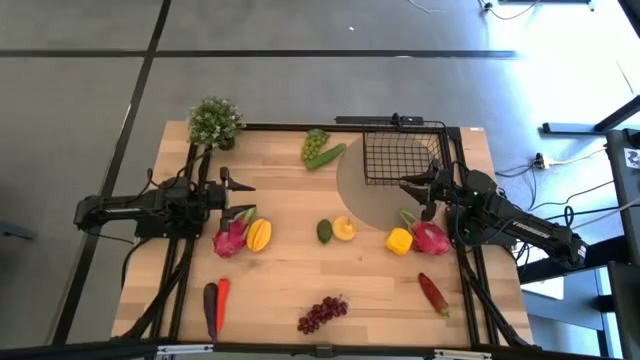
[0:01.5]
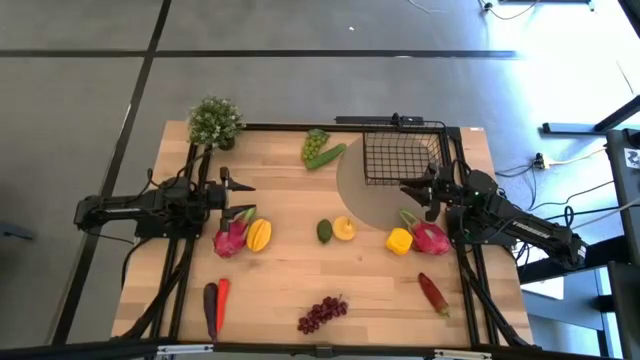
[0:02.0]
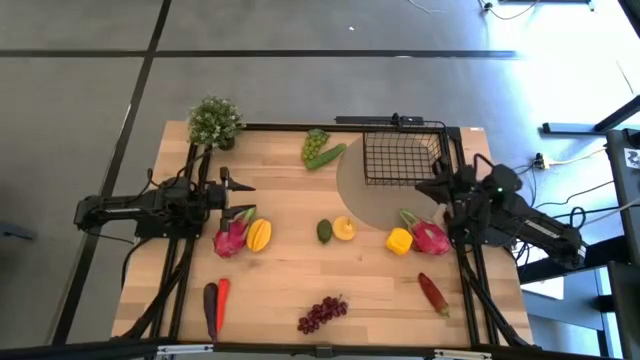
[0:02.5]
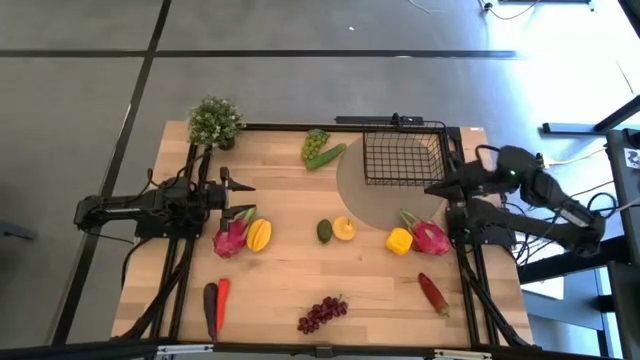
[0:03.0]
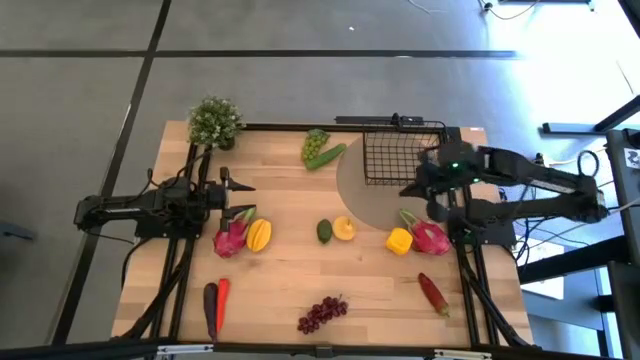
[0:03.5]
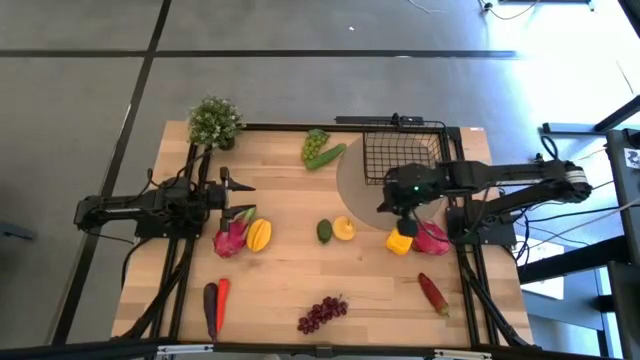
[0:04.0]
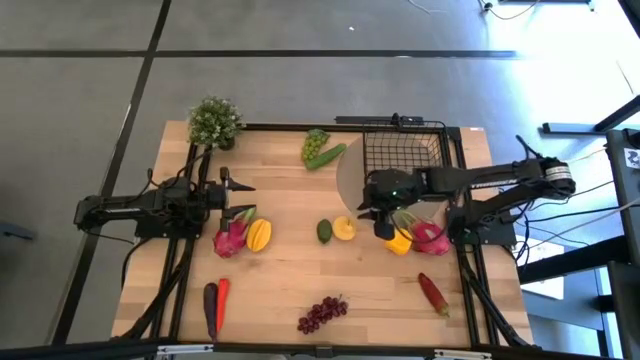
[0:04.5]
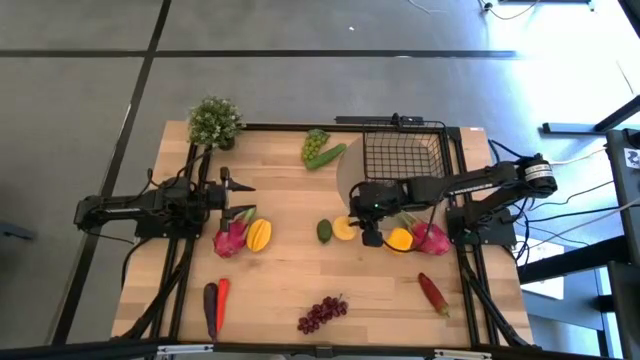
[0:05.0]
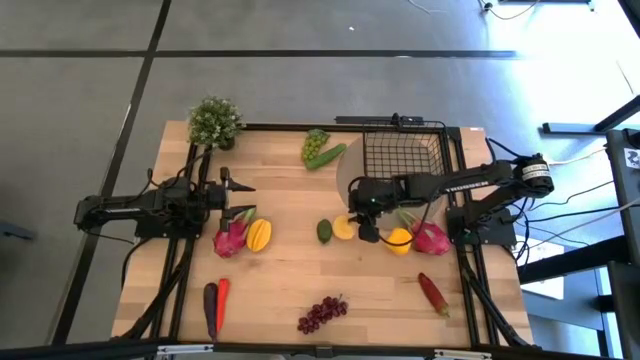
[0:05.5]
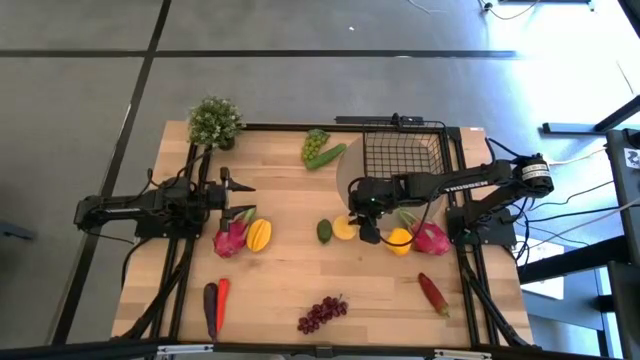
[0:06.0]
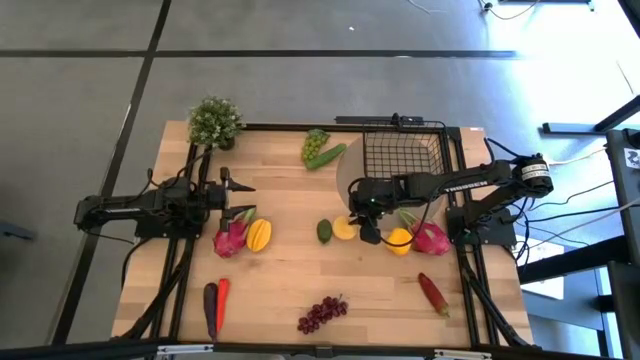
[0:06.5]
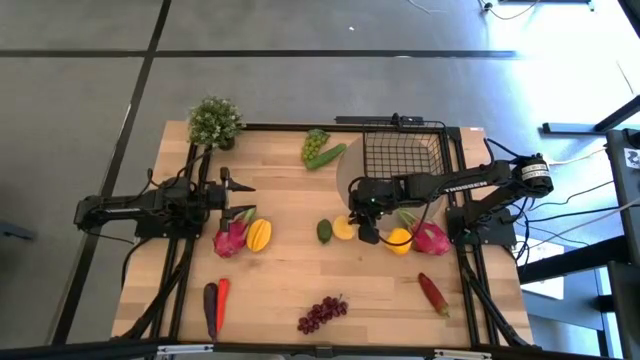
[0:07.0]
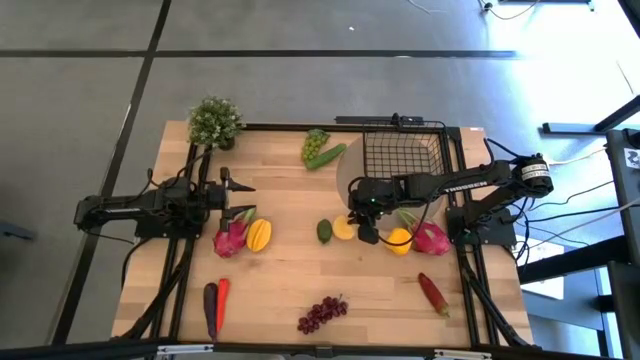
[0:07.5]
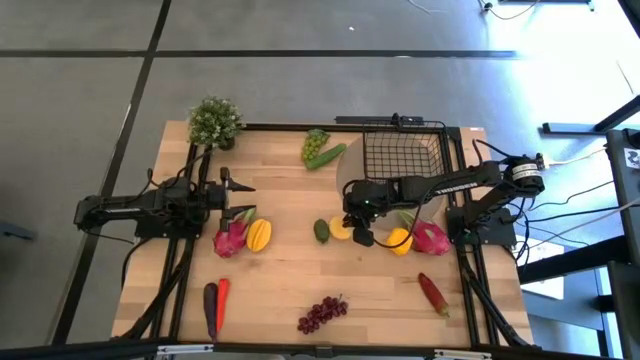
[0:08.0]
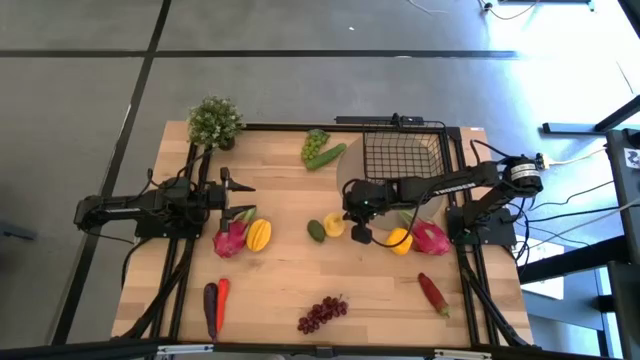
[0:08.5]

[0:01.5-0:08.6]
Task: Build produce basket
Put the pear into the wire basket

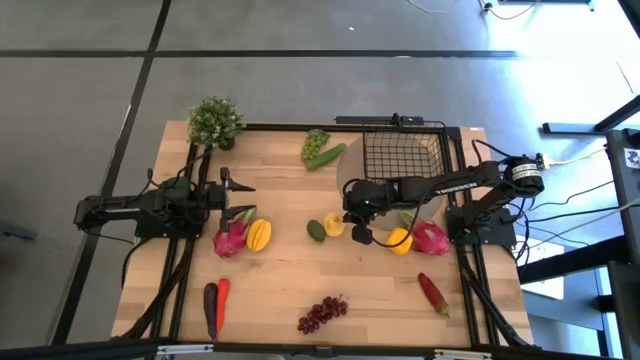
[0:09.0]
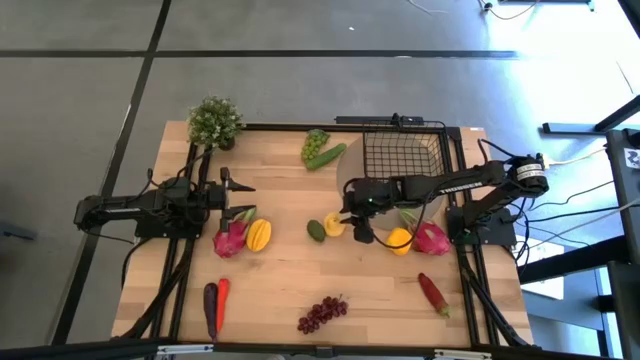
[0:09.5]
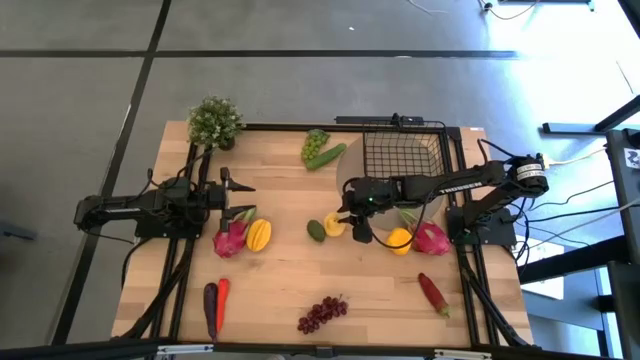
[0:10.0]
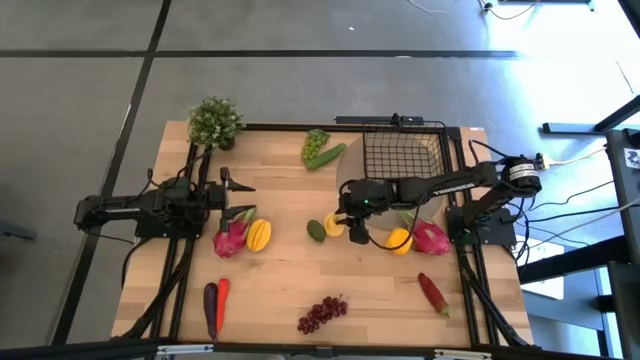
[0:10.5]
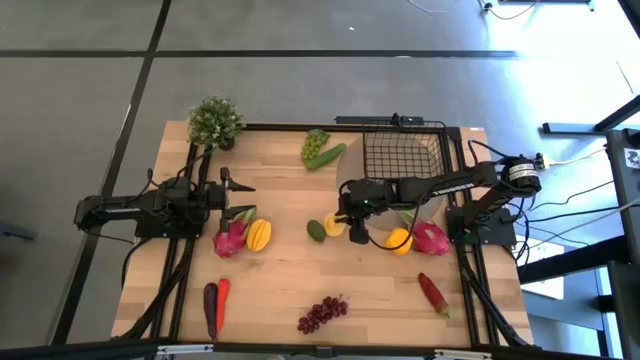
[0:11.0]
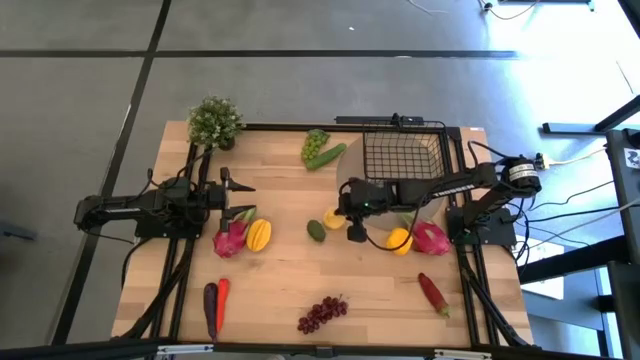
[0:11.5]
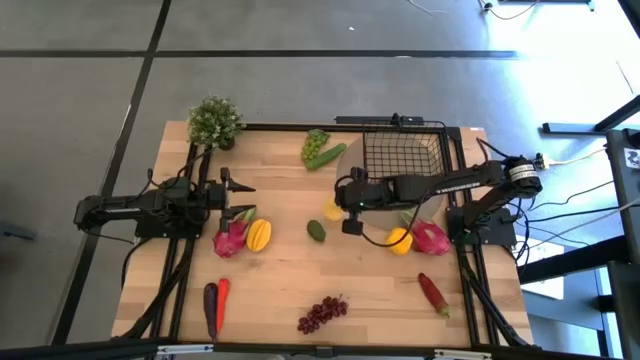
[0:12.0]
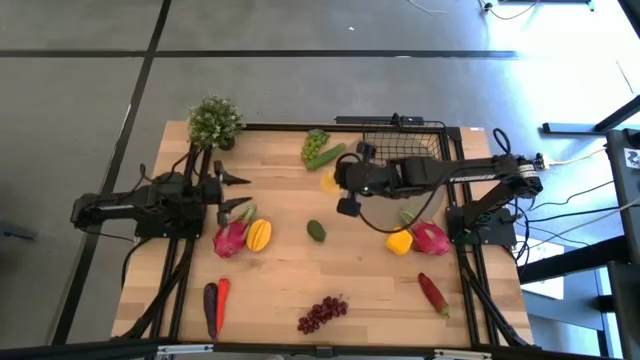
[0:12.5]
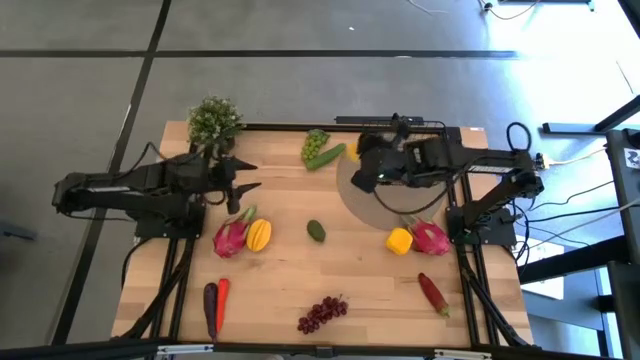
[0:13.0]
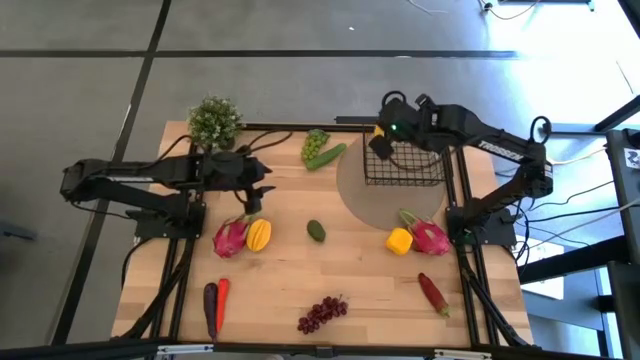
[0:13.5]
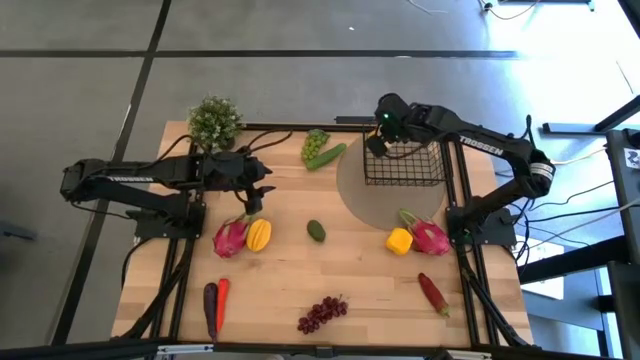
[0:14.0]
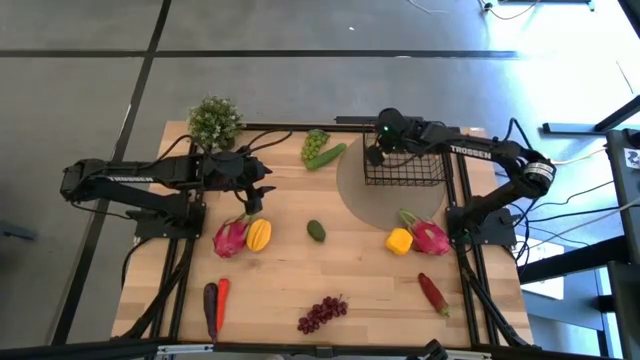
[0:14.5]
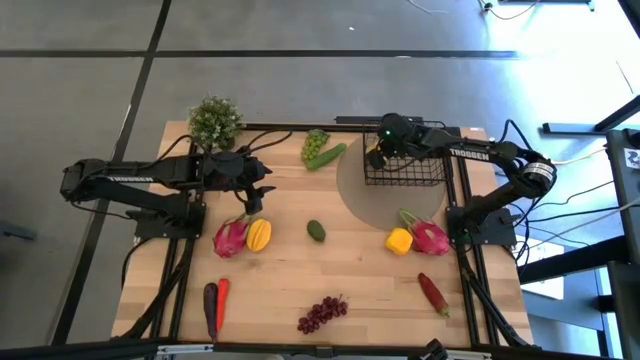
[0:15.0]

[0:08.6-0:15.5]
Put the pear into the wire basket

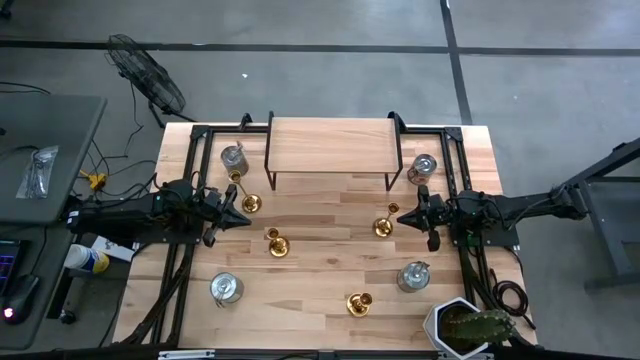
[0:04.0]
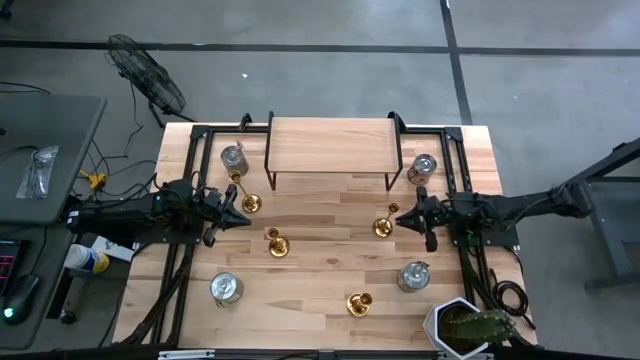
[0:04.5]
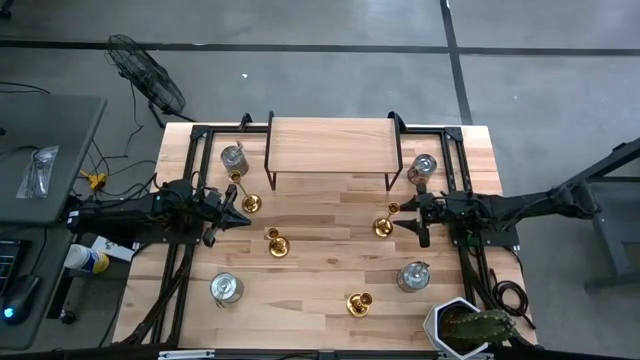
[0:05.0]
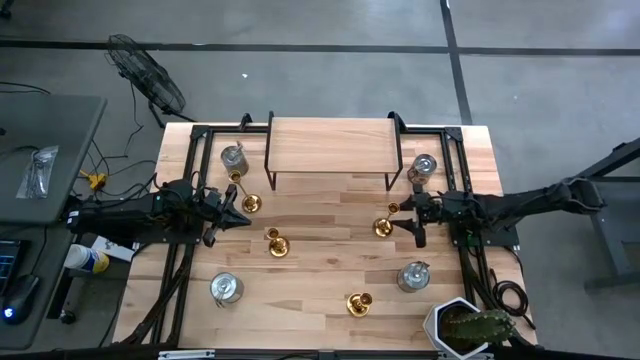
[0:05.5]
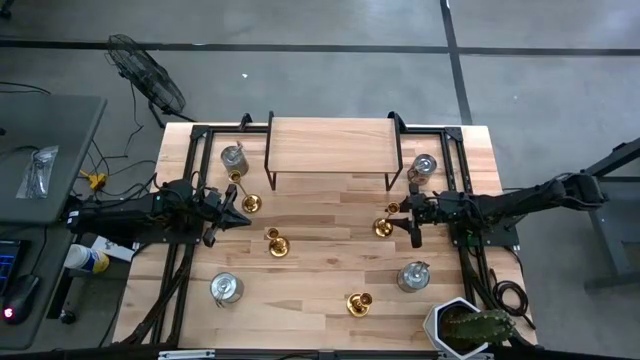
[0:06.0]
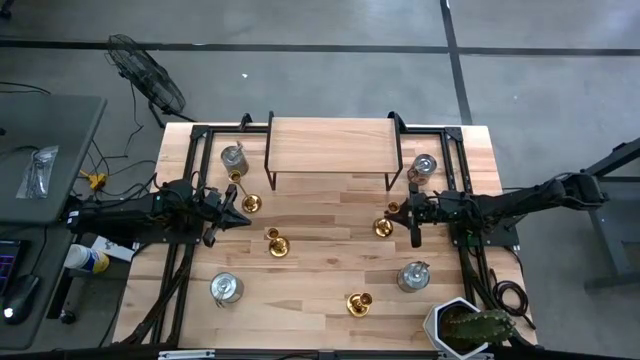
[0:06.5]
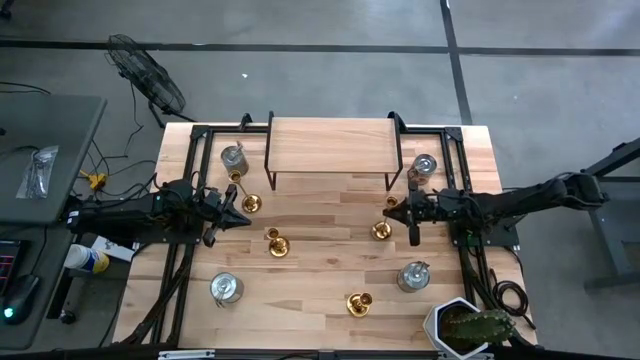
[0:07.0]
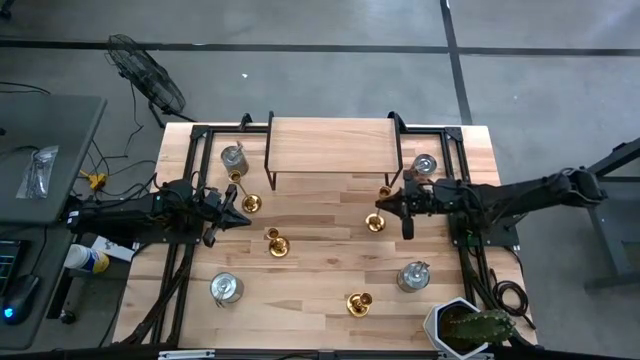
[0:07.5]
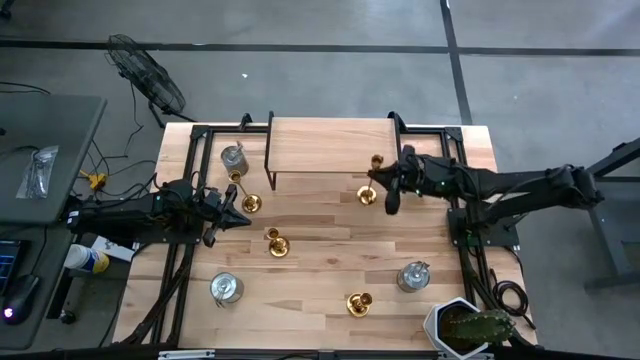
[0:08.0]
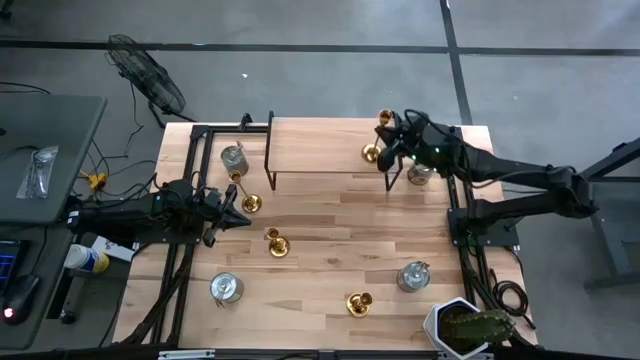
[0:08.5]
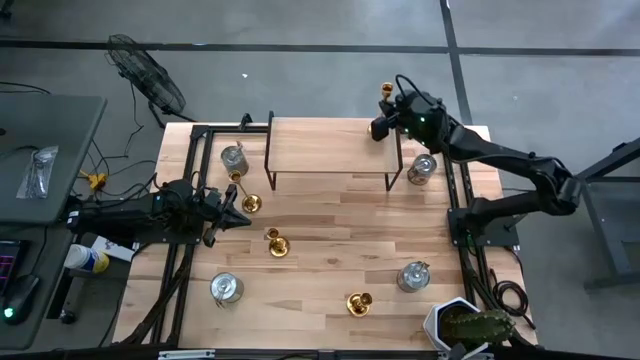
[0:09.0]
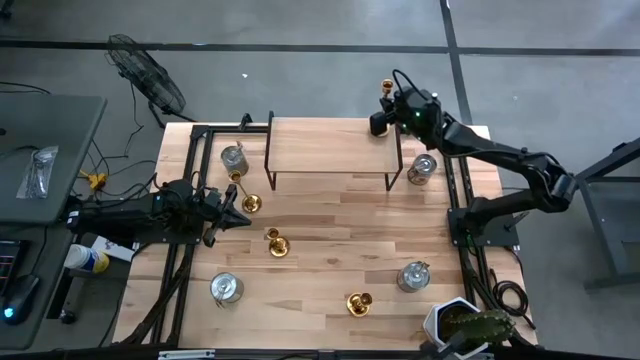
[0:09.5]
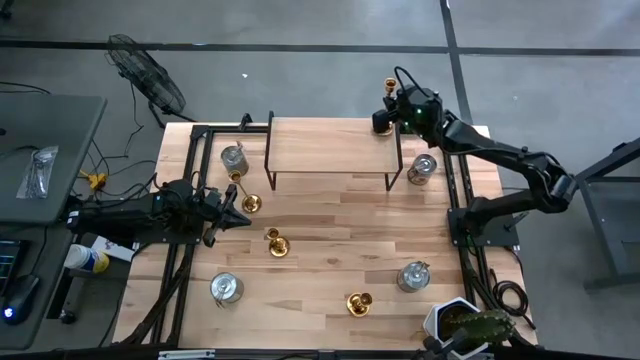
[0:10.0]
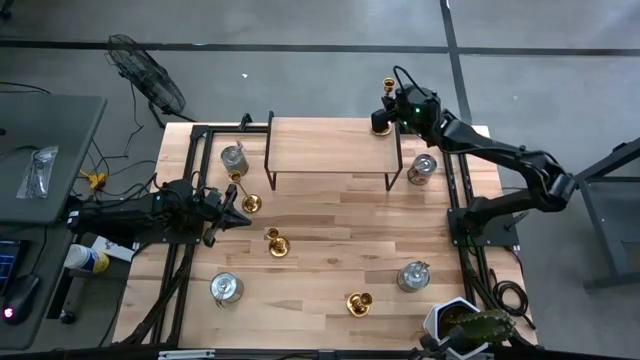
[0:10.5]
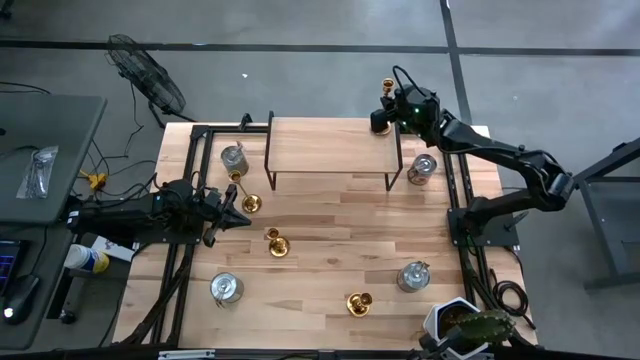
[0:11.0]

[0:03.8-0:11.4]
Task: Pick & Place candle stick holders
Put the gold candle holder on the shelf
